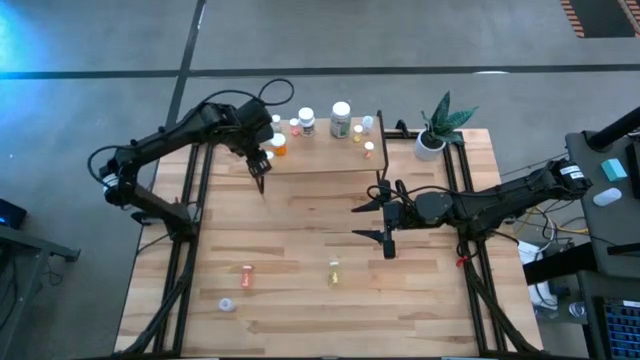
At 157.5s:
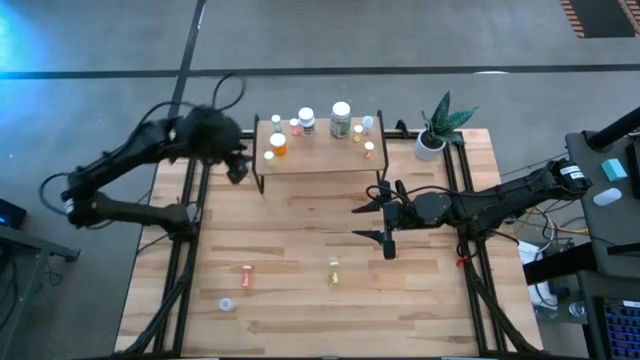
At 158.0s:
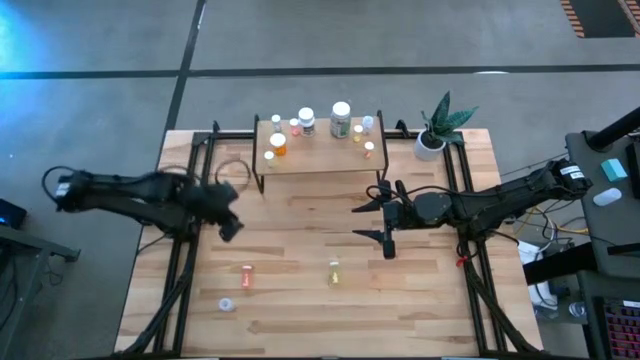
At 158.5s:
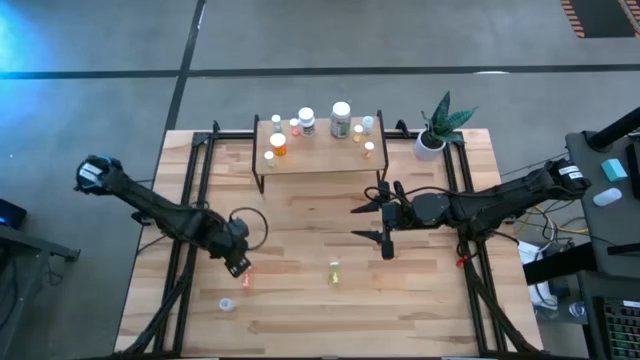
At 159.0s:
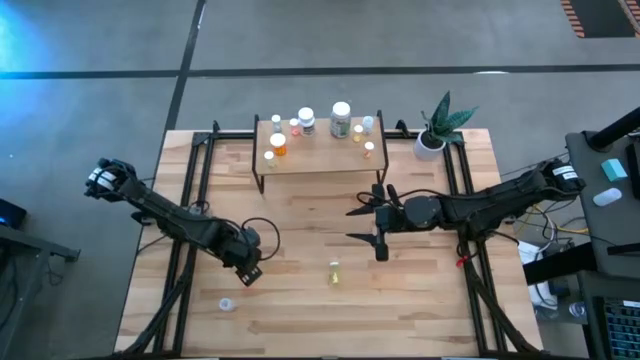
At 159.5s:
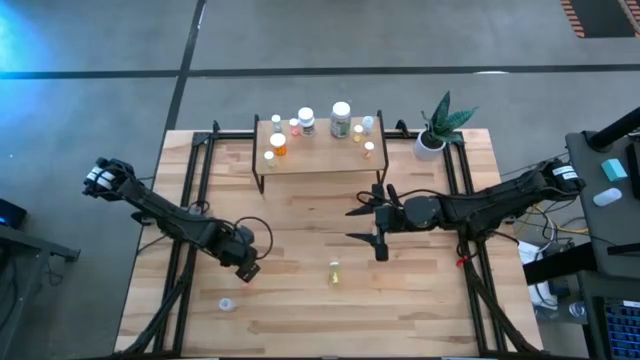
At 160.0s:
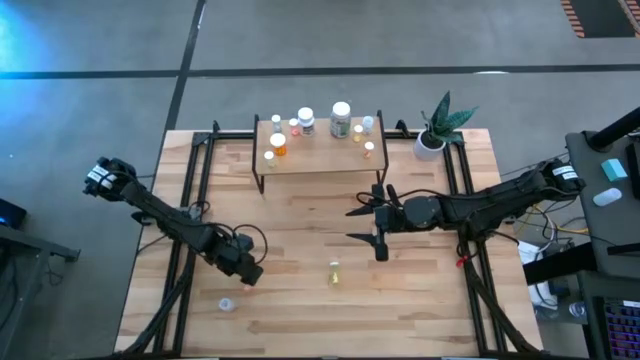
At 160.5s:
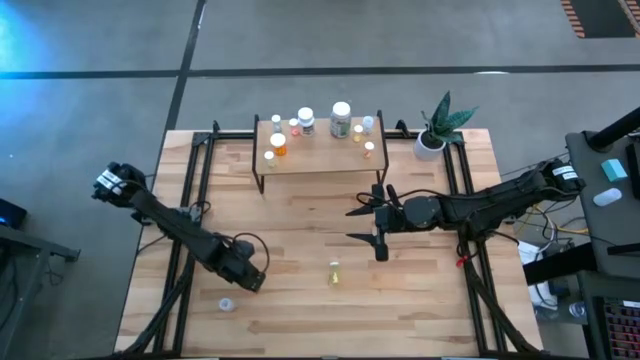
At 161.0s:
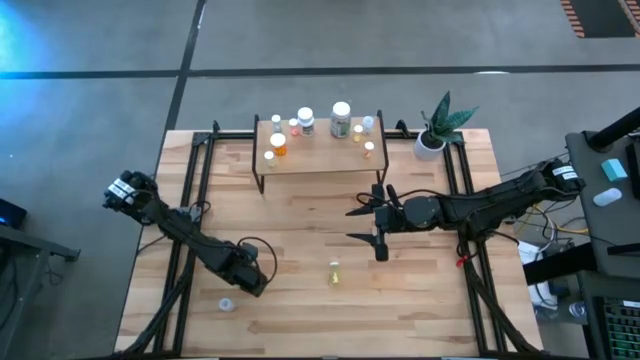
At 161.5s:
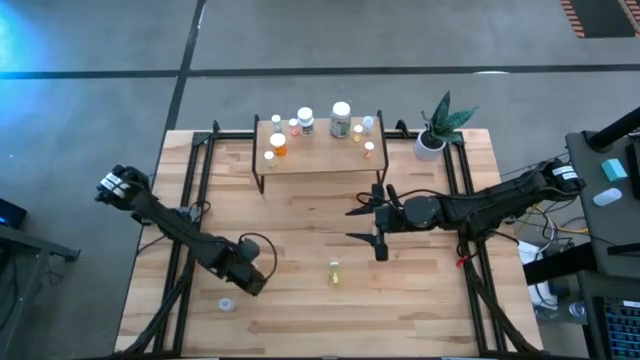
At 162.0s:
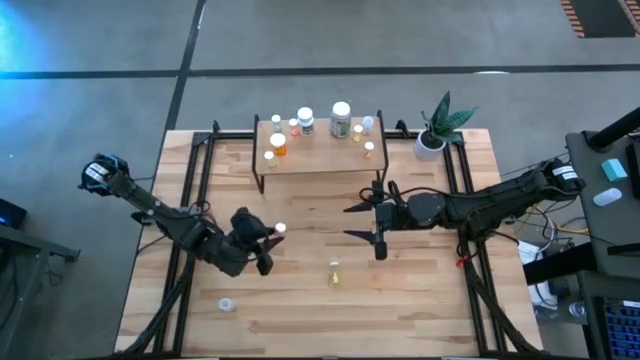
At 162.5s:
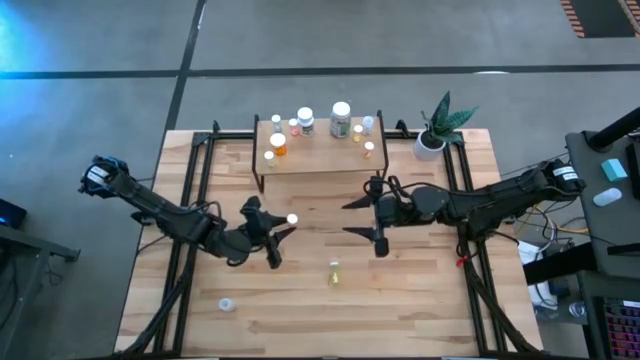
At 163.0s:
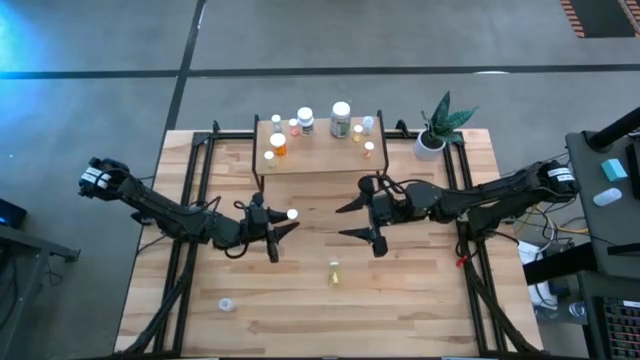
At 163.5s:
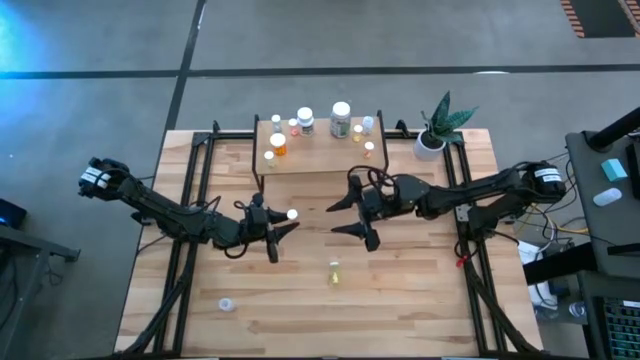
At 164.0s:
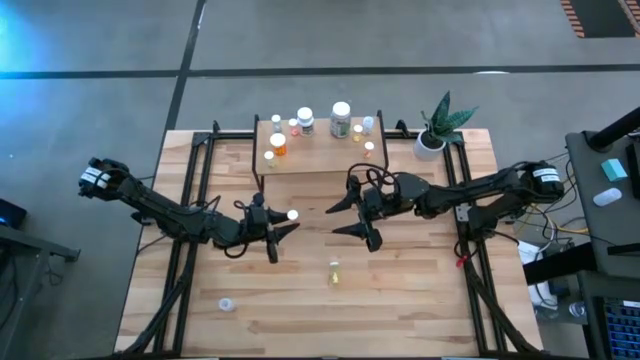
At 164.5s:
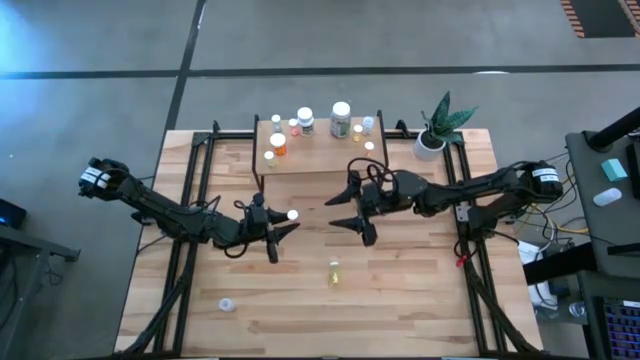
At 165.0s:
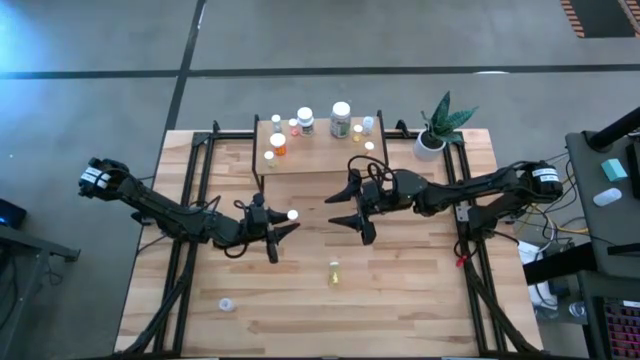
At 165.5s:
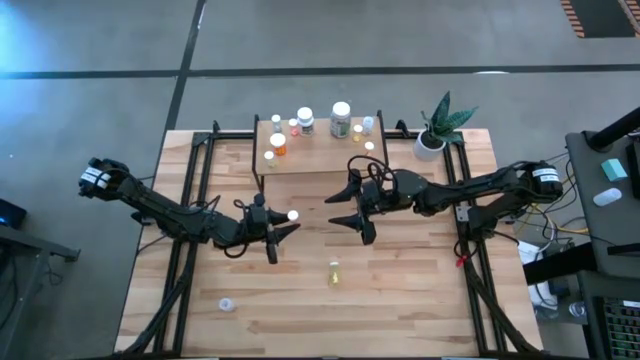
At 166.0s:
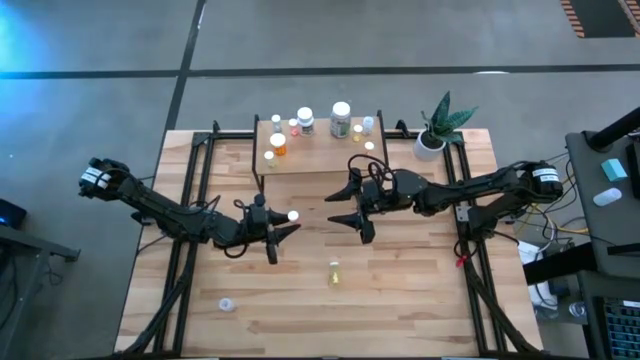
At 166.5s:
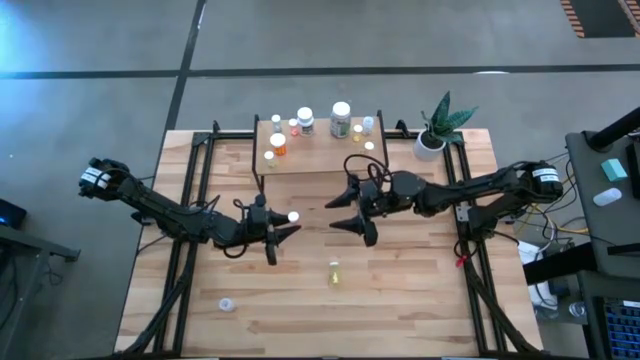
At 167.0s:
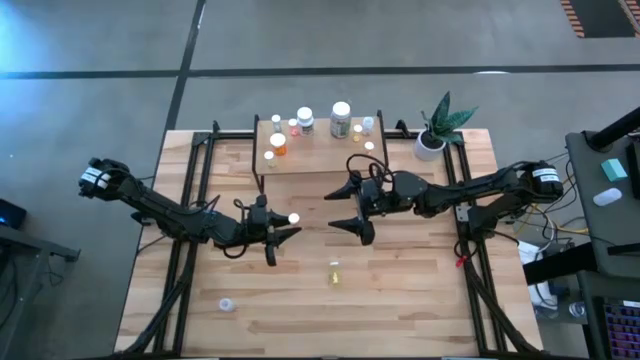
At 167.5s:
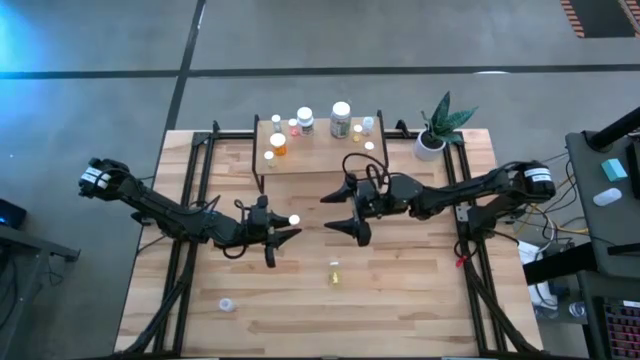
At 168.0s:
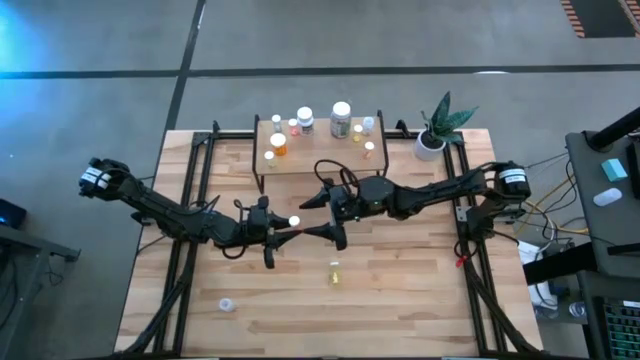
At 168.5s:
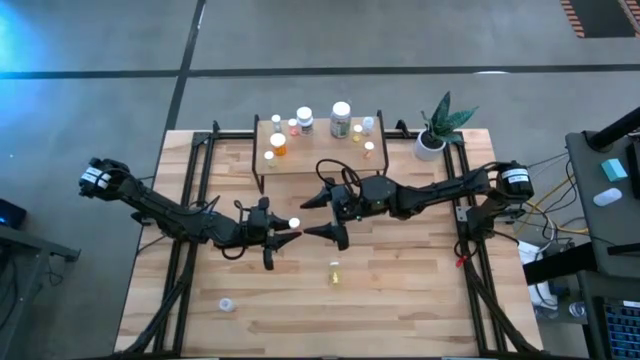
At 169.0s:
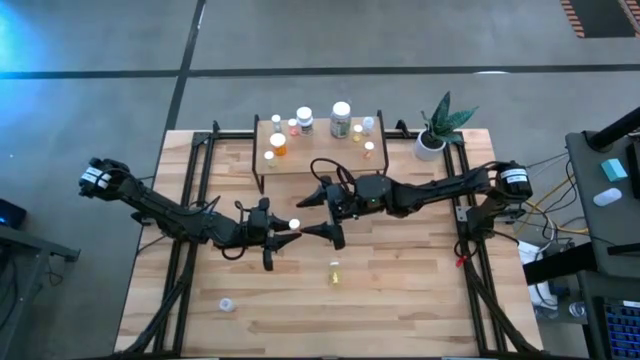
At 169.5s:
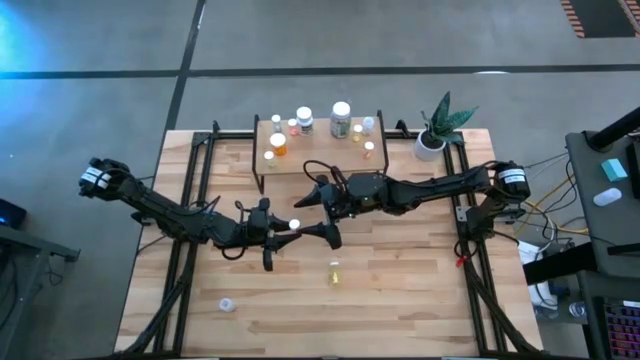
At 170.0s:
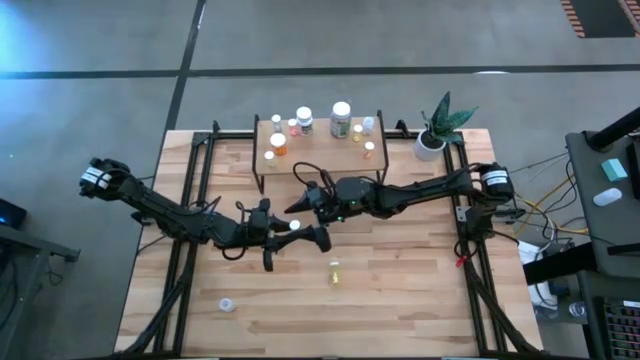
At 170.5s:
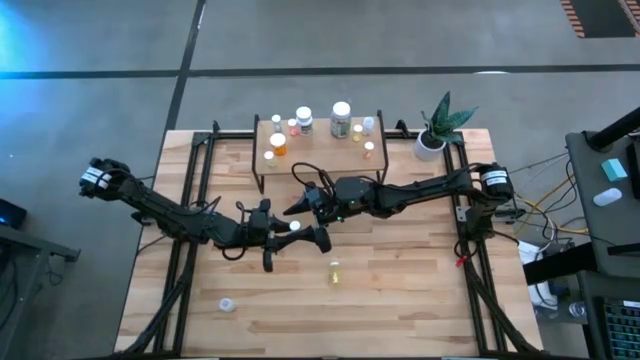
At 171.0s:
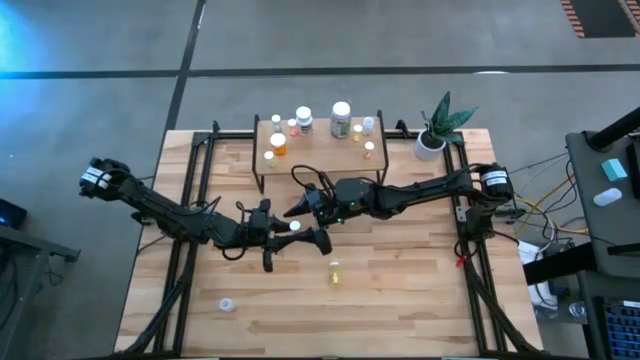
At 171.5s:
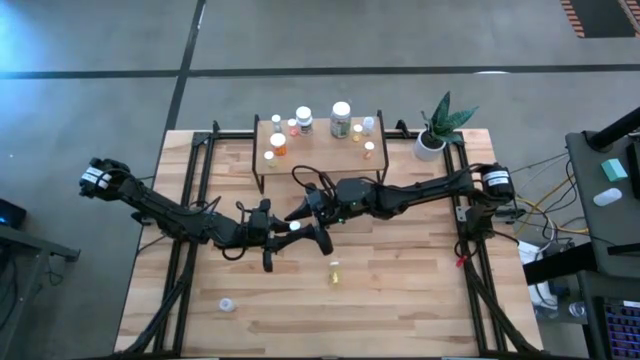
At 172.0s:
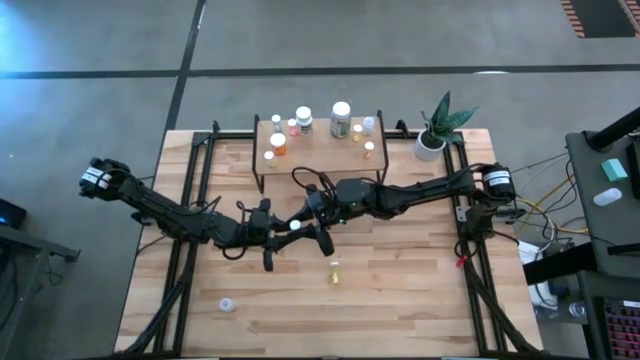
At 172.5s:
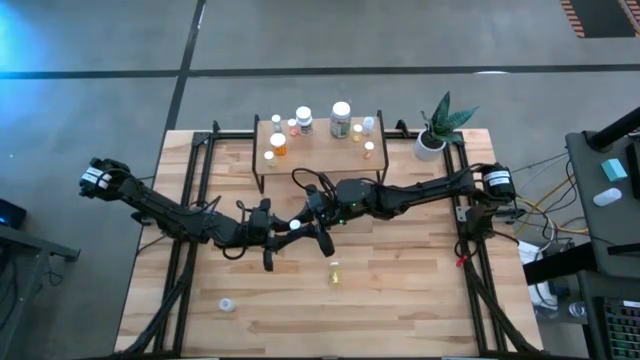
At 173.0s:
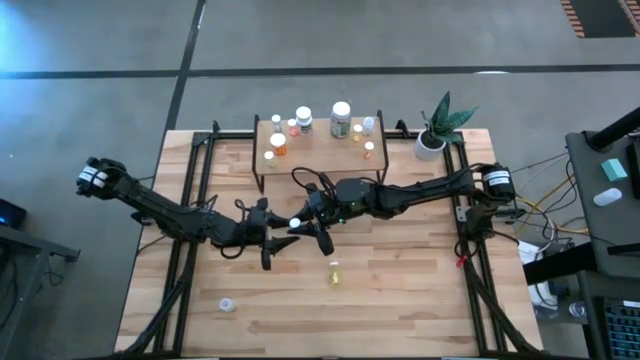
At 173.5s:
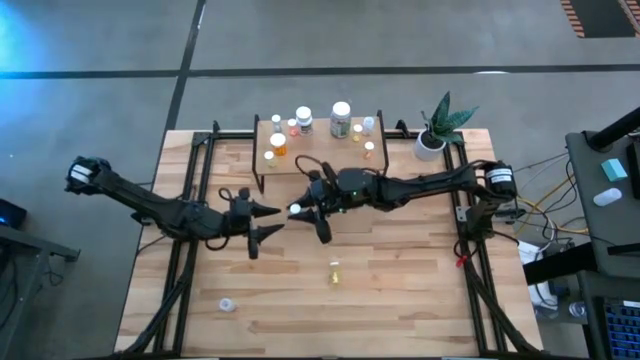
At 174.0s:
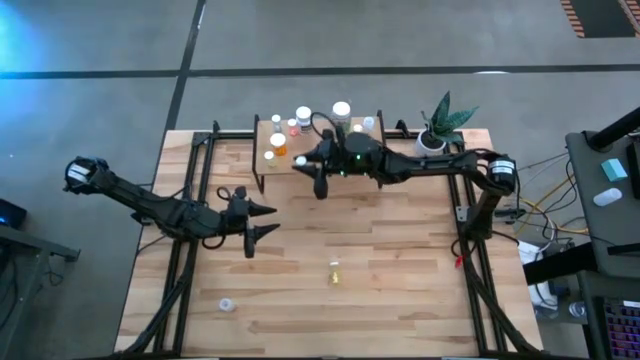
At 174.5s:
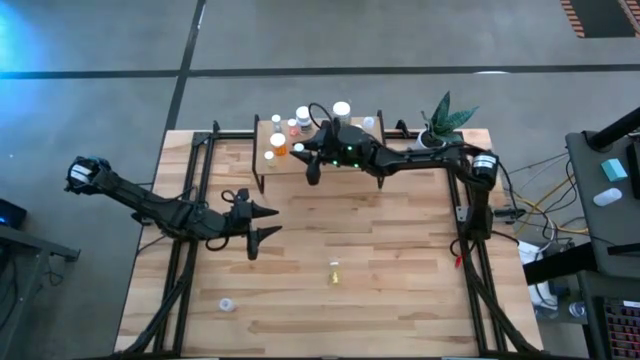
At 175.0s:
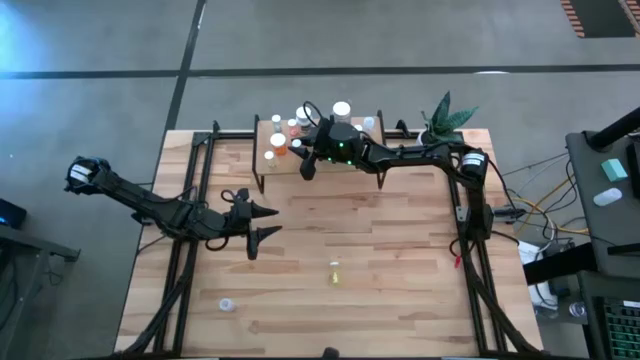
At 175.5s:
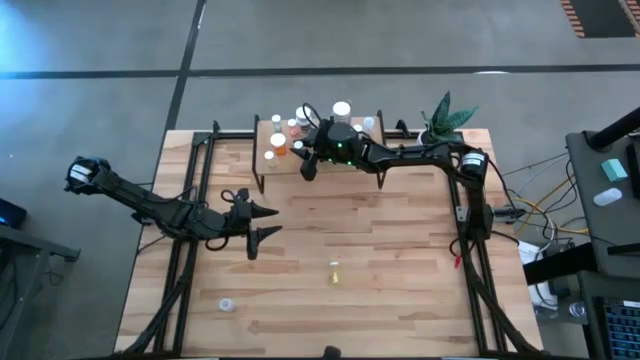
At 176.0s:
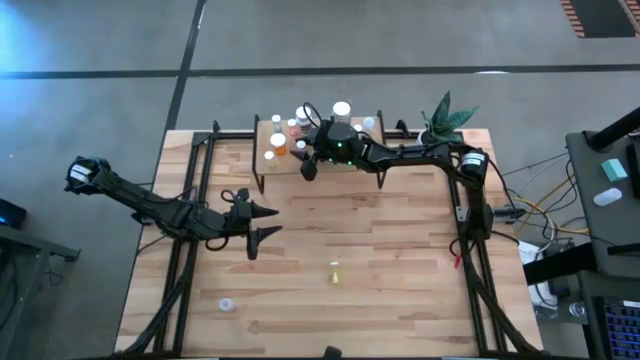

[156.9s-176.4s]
Task: Pick and place medicine bottles onto shelf by color
Put the pink medicine bottle on the shelf

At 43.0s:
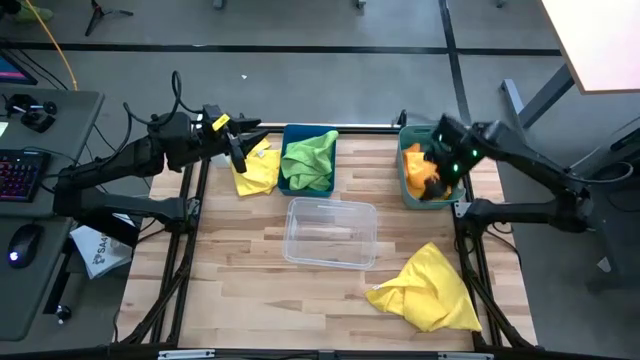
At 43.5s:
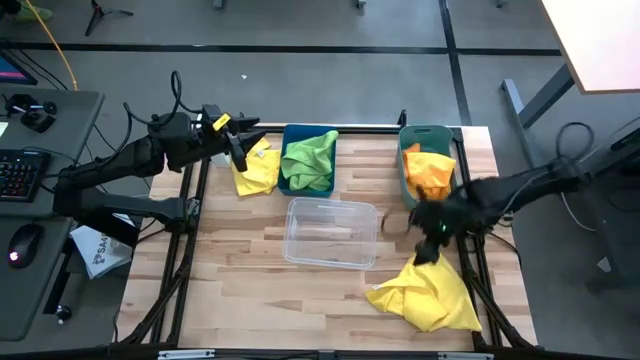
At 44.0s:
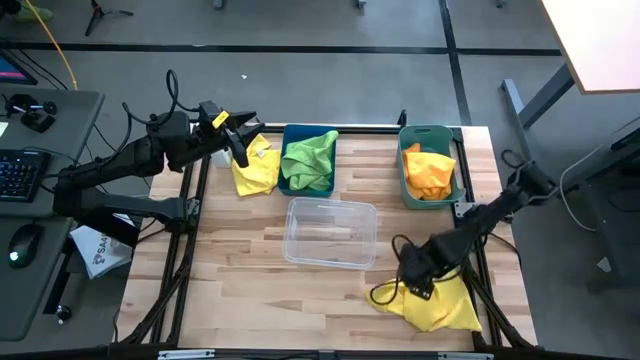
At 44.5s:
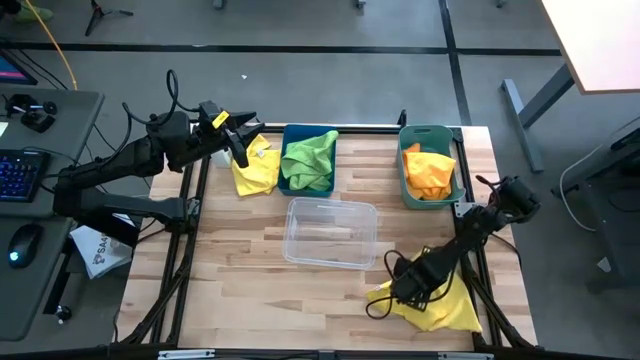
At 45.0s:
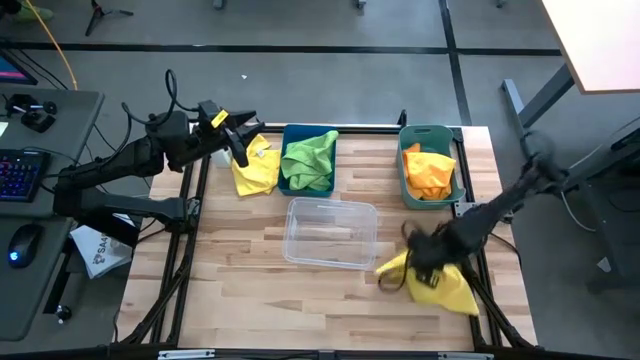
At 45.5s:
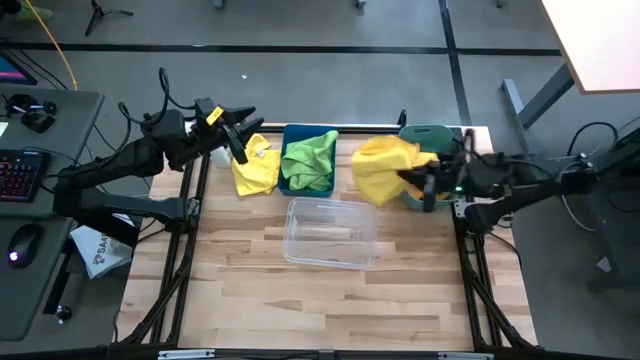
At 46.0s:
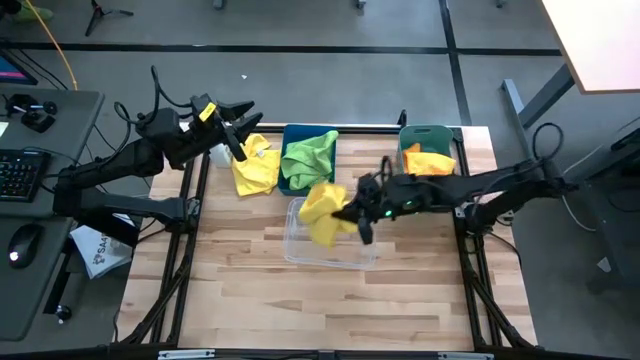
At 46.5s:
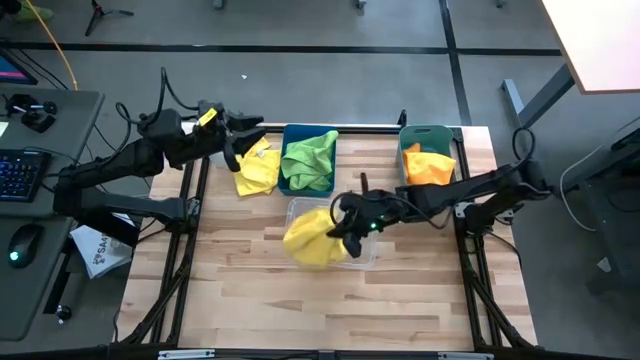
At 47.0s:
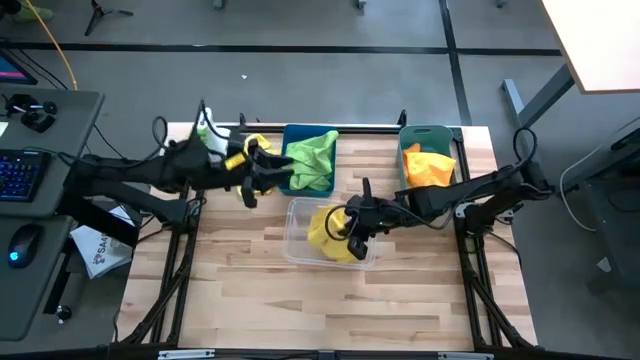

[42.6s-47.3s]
Task: Sort microfiber towel by color & place in baskets
Put the bottom yellow microfiber cloth into the transparent bin
